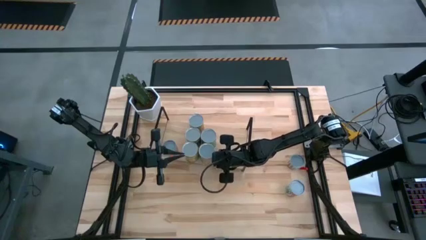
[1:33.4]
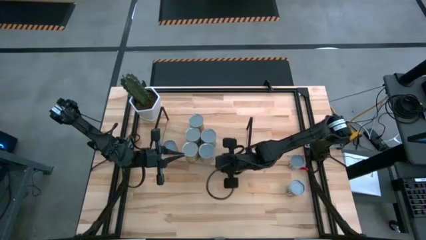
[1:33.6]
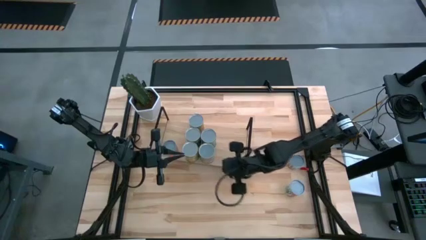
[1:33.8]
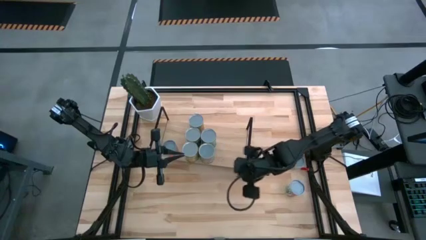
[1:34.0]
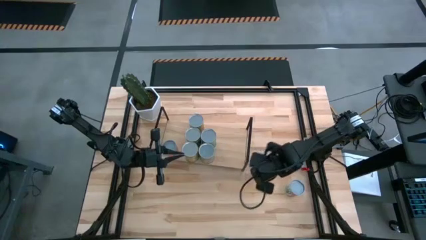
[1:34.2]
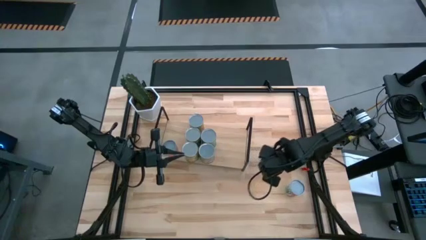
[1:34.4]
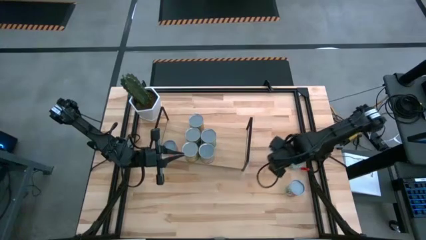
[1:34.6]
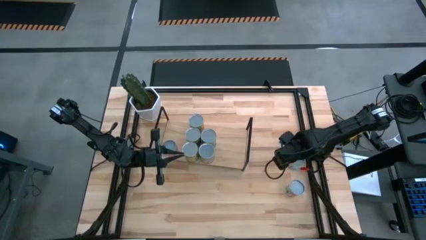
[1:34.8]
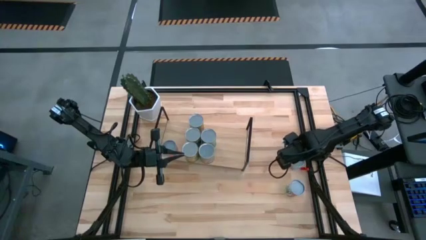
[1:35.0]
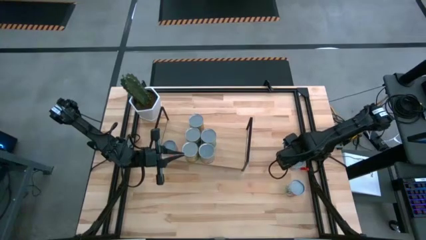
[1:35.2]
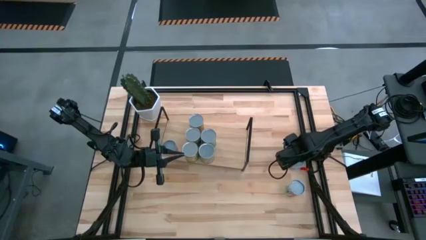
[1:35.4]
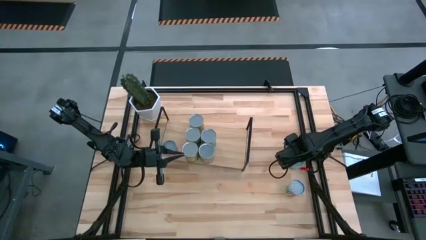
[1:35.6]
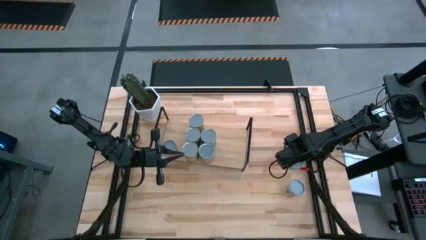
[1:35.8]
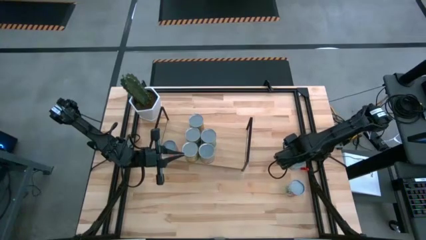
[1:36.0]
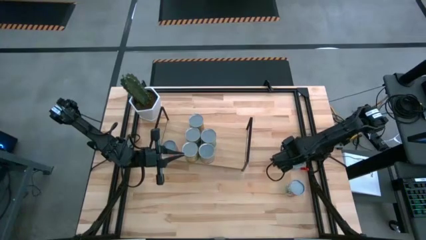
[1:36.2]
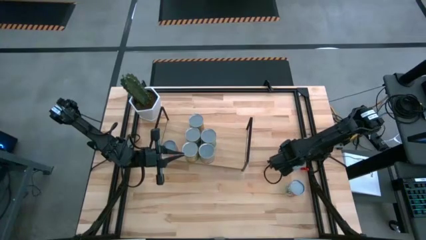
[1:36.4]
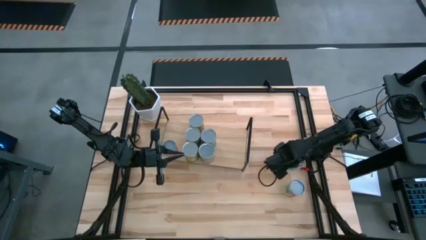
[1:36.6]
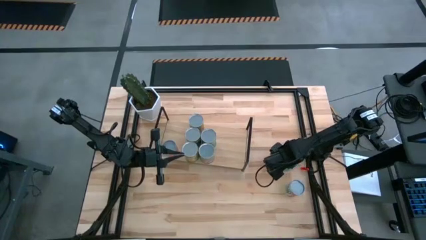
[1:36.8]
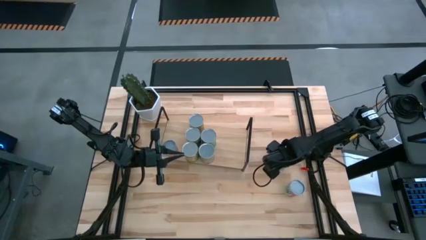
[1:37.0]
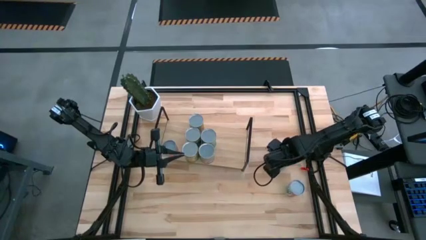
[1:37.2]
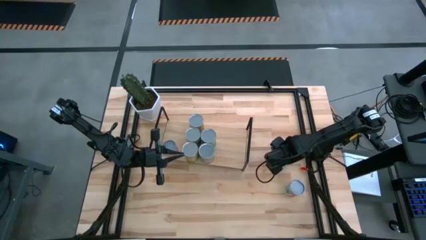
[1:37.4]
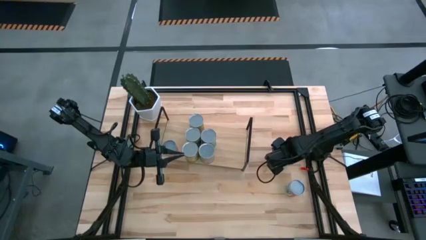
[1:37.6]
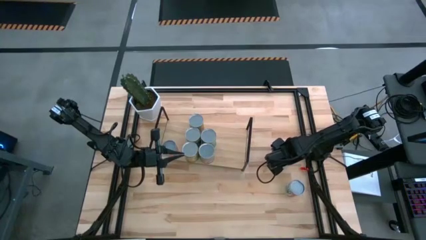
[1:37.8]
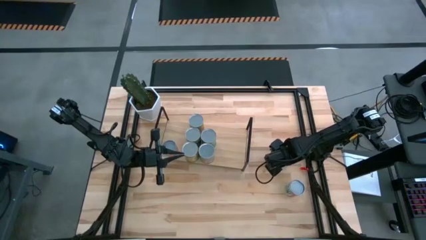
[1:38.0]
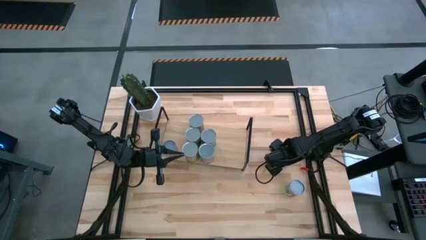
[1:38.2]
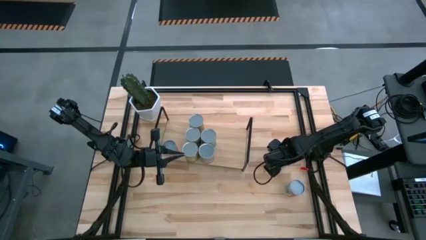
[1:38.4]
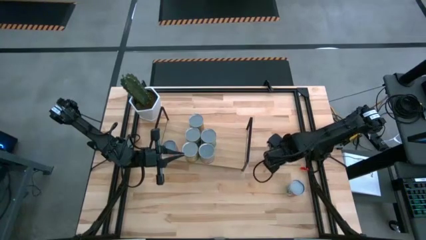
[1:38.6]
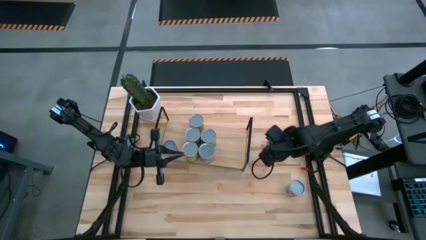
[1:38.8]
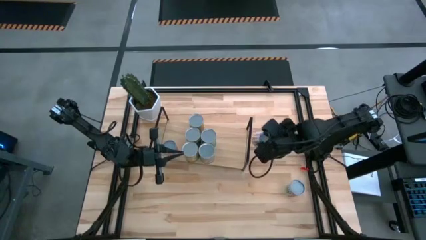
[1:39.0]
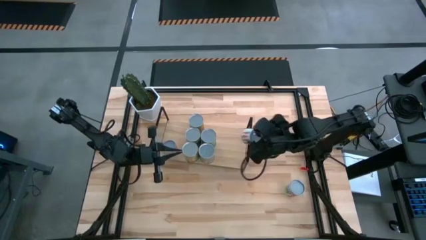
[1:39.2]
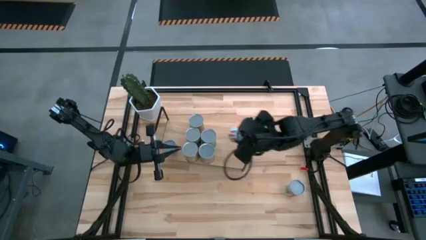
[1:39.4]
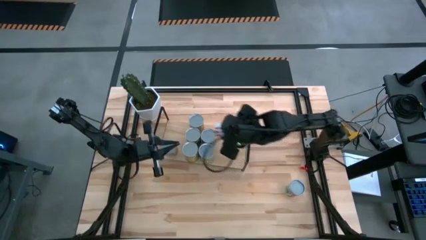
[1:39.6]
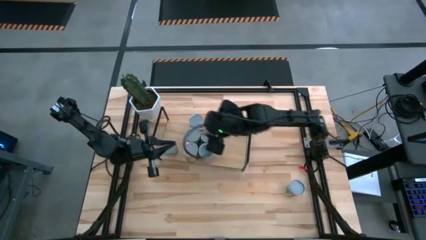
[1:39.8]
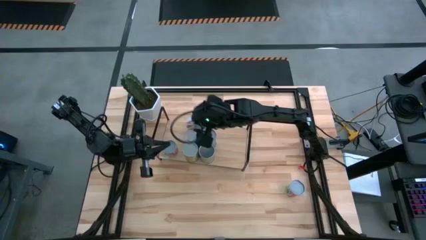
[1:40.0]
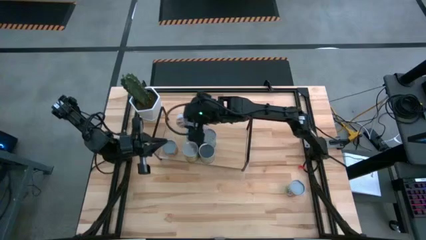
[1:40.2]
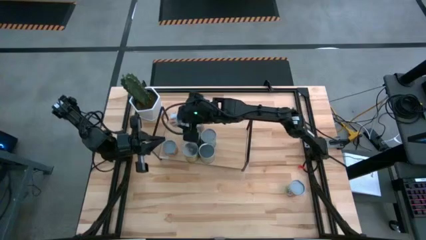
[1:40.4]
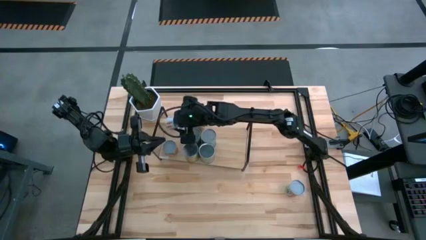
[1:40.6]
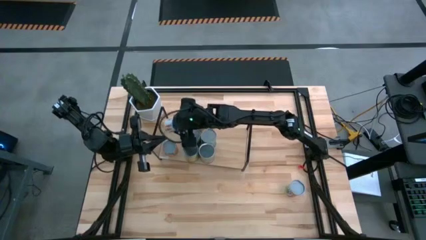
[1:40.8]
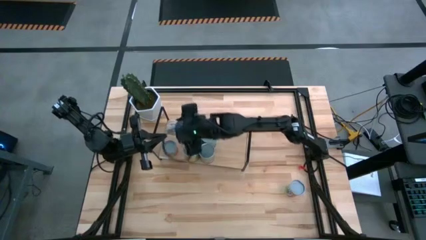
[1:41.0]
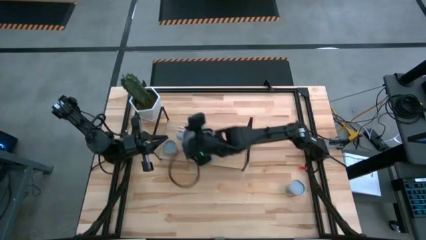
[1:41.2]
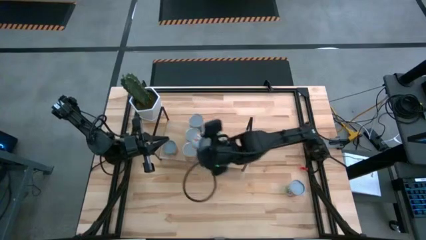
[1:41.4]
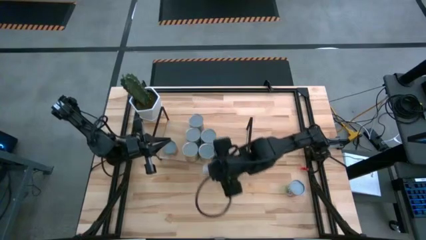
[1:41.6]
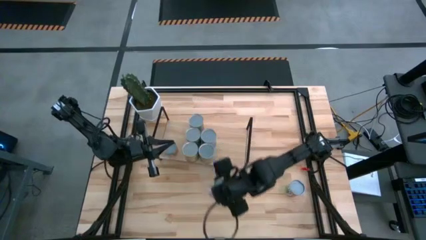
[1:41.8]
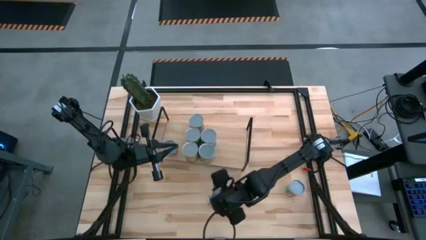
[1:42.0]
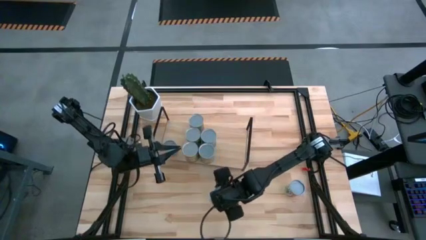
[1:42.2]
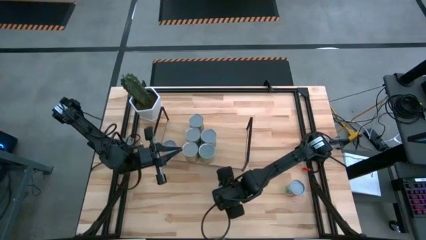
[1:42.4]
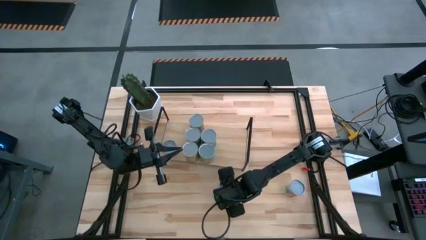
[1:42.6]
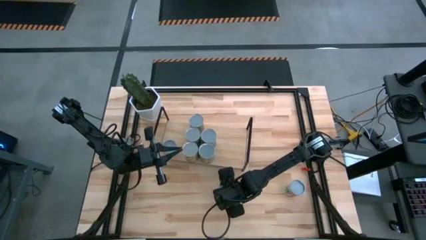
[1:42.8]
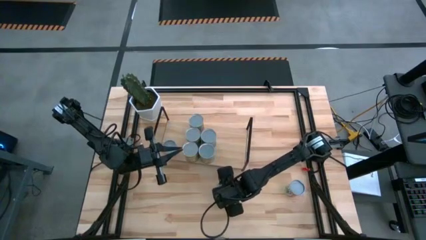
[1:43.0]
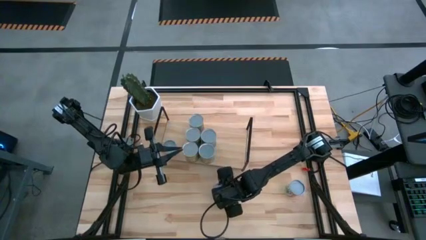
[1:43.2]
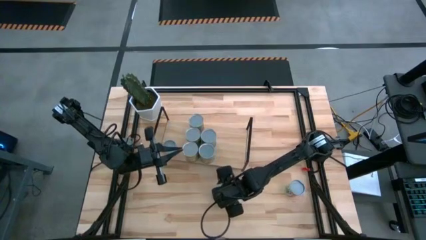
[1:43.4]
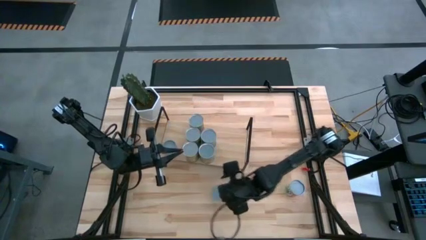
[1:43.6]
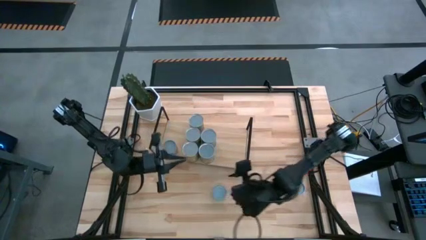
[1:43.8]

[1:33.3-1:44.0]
Task: Pick and place cans onto a shelf
Put the canned carrots on the shelf

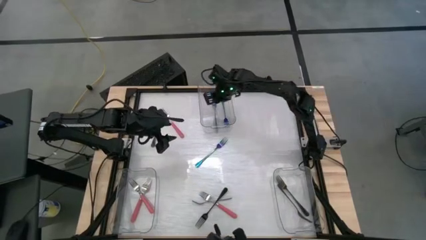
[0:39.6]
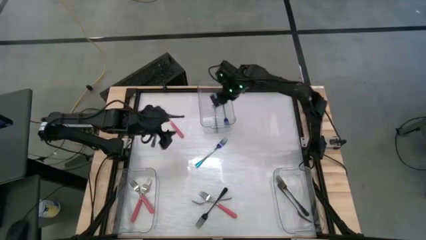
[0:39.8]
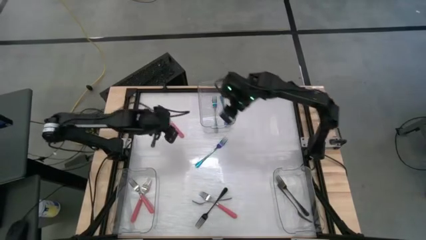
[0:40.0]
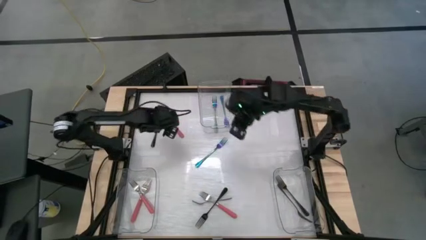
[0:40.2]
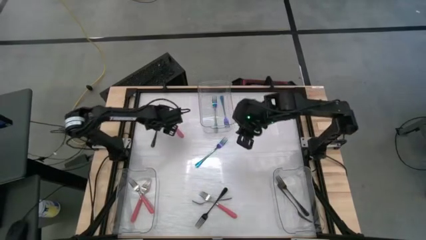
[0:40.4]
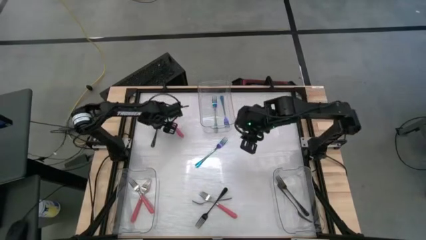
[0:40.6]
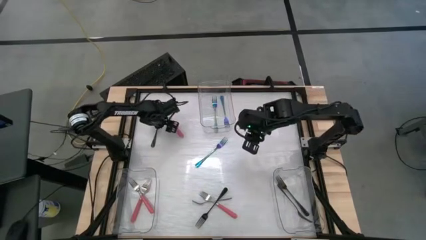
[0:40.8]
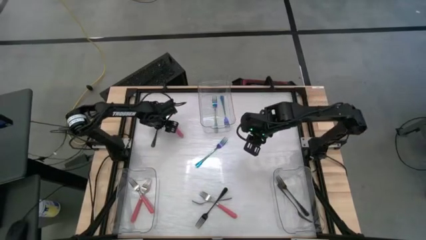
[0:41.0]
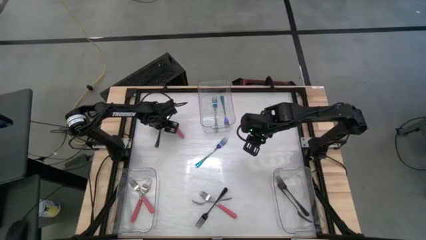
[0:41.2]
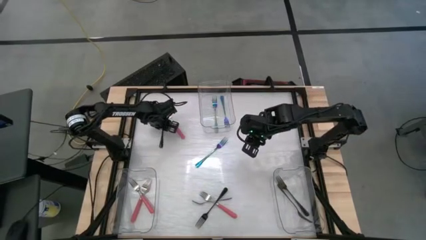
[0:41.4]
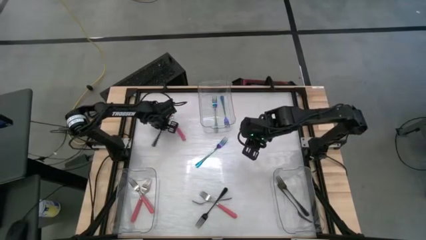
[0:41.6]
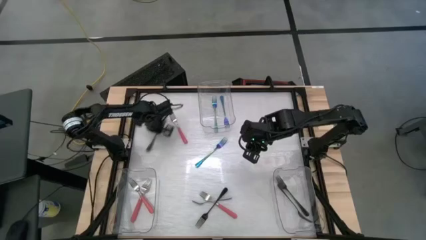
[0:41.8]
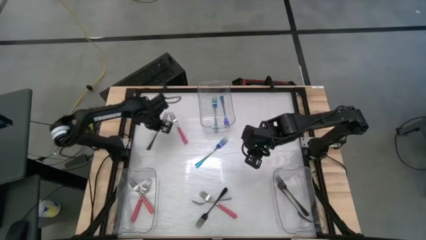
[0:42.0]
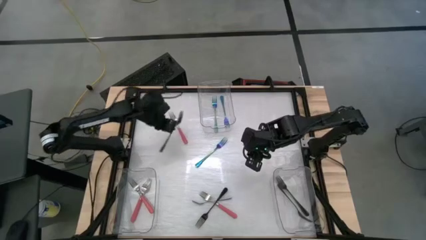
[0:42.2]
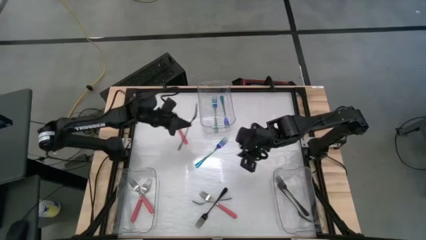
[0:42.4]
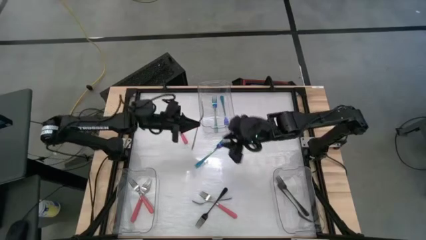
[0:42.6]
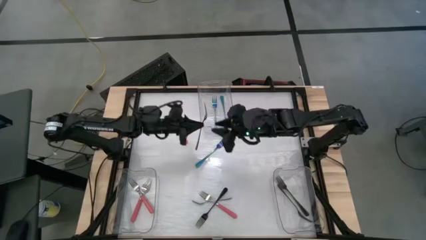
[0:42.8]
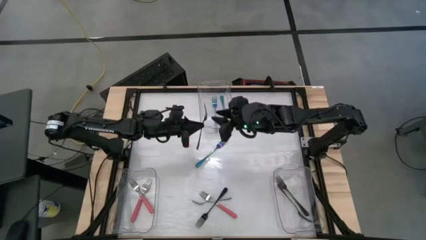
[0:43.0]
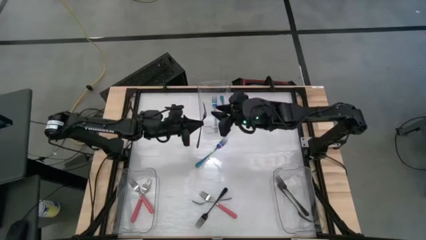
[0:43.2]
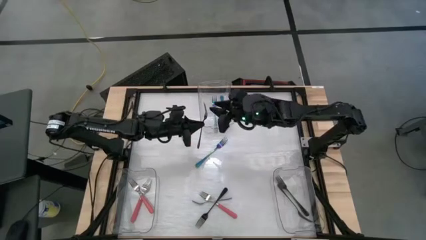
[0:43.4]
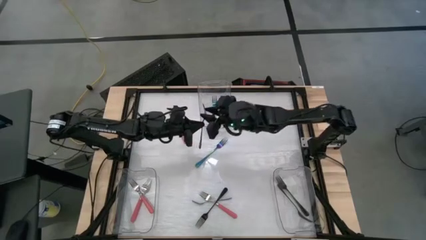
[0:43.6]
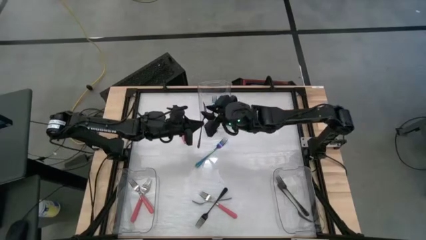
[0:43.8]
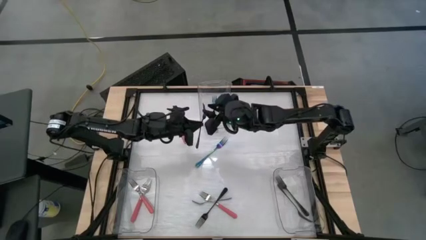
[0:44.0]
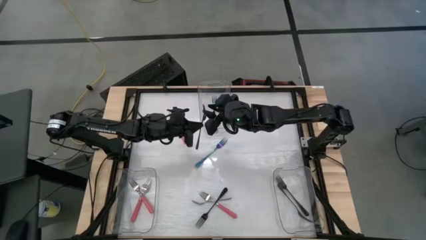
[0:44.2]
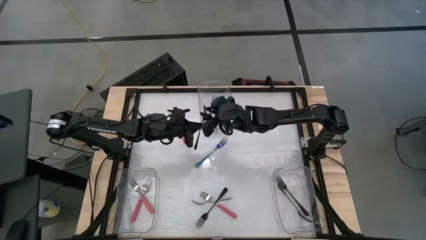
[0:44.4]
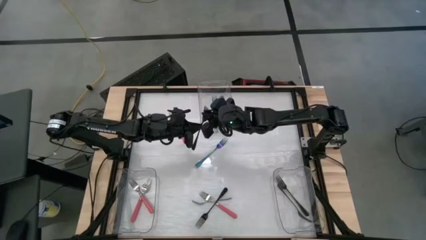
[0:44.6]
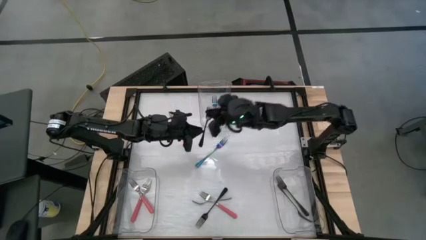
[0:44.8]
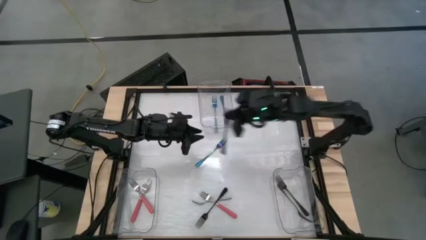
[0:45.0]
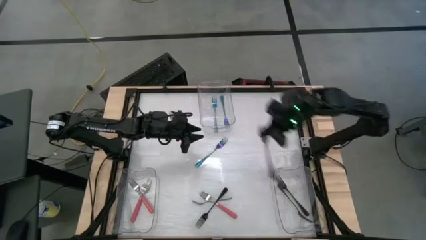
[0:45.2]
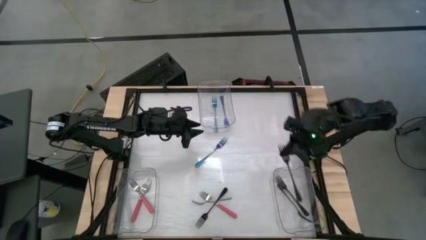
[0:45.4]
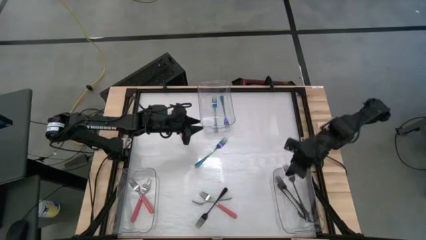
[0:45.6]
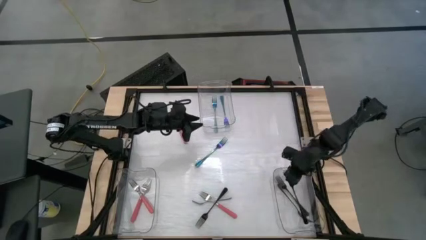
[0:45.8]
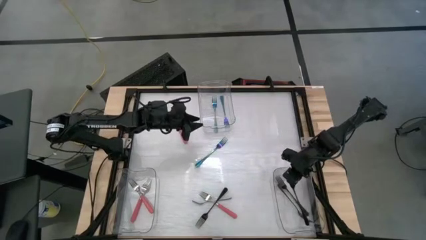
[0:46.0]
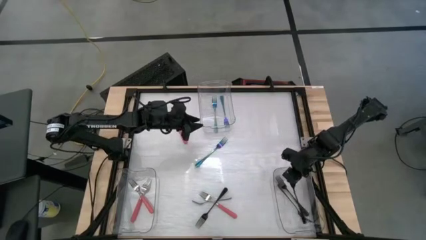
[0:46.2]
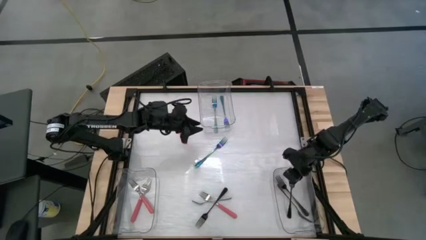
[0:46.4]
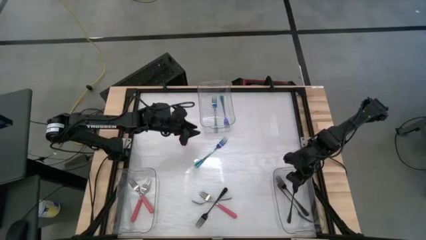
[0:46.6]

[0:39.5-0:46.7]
Task: Sort silverware by color (type)
Put the black fork into the bottom right transparent bin
